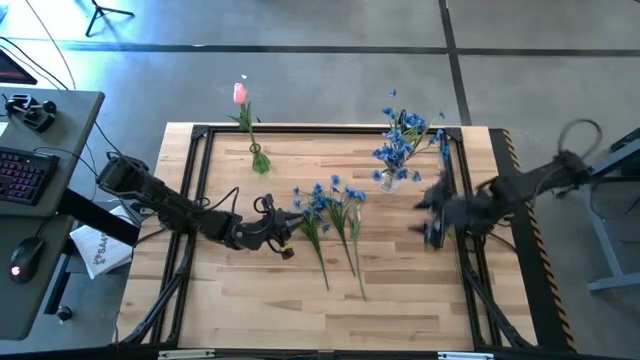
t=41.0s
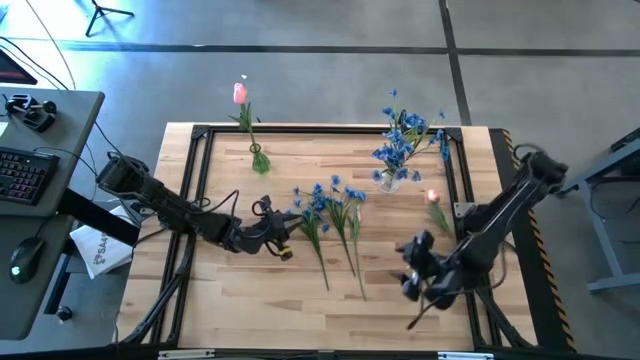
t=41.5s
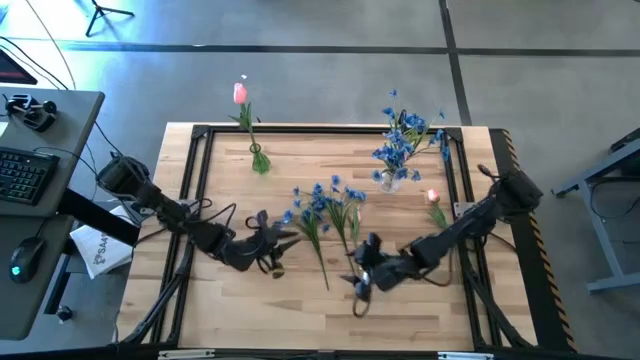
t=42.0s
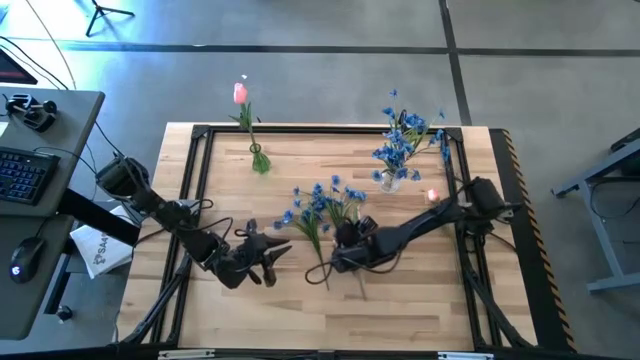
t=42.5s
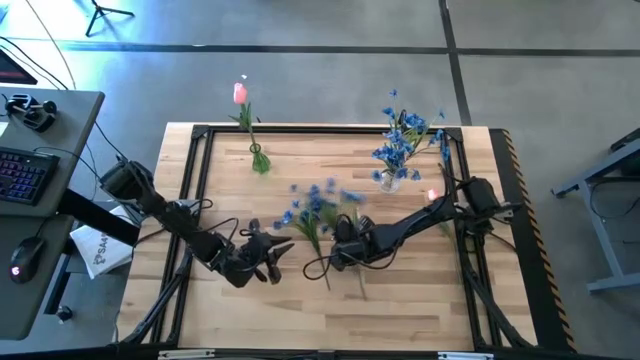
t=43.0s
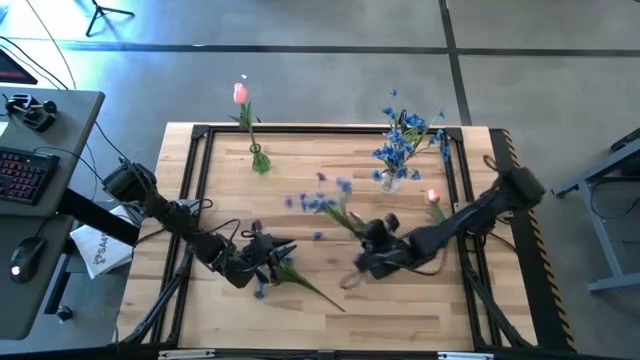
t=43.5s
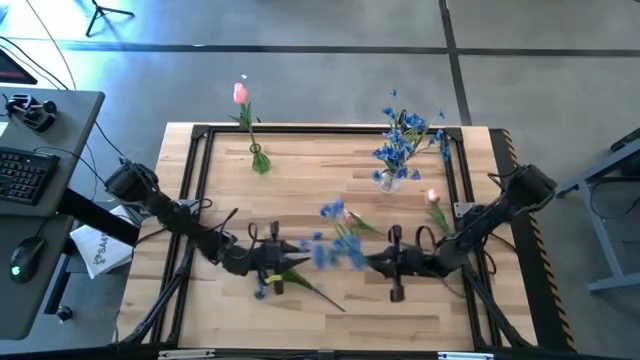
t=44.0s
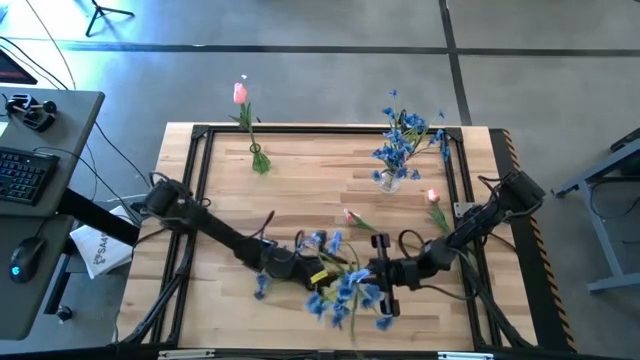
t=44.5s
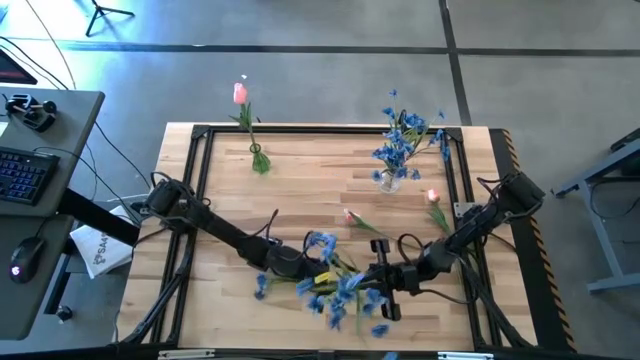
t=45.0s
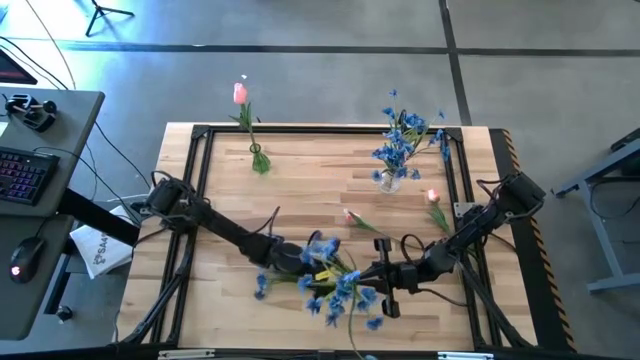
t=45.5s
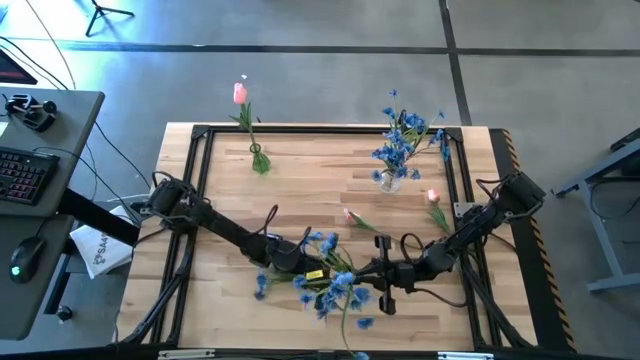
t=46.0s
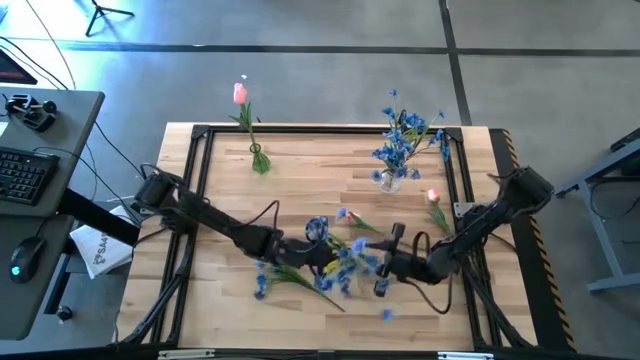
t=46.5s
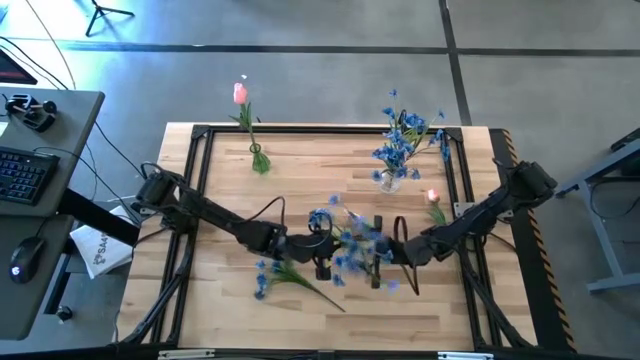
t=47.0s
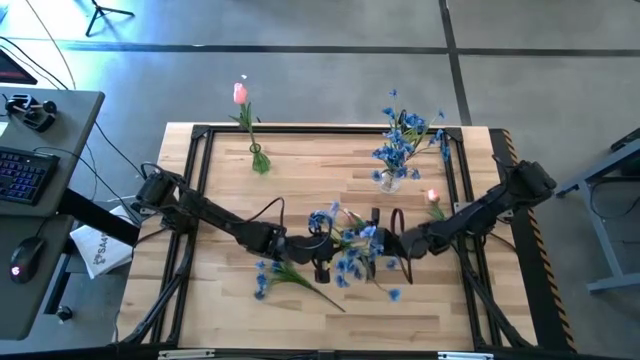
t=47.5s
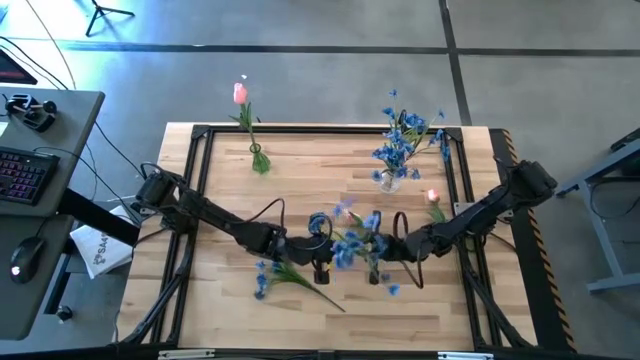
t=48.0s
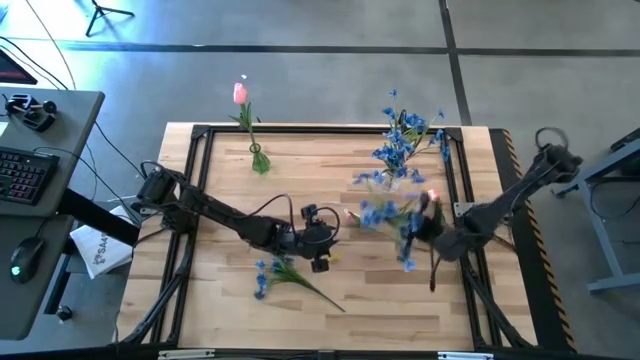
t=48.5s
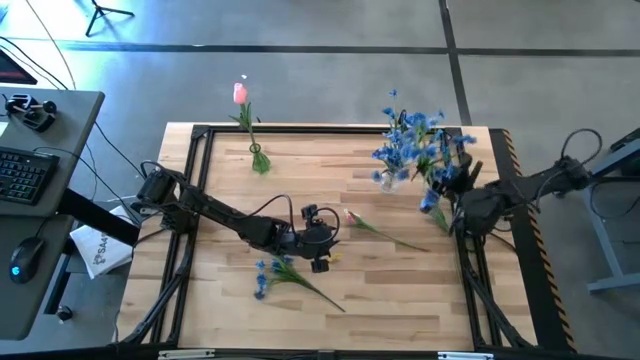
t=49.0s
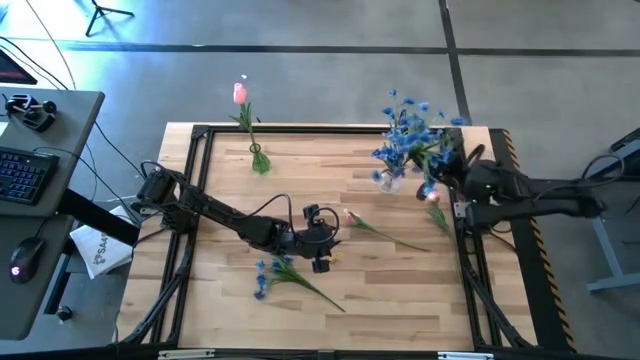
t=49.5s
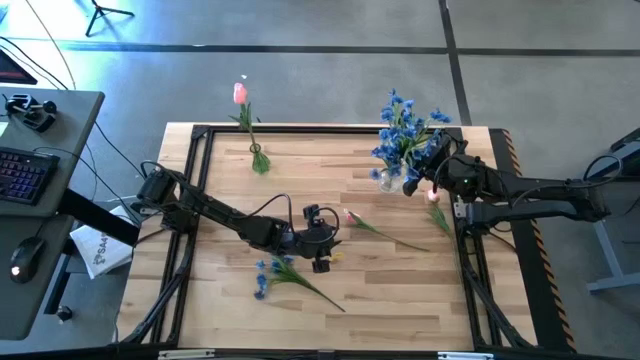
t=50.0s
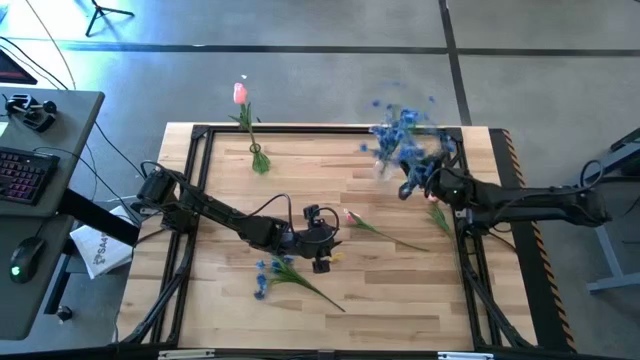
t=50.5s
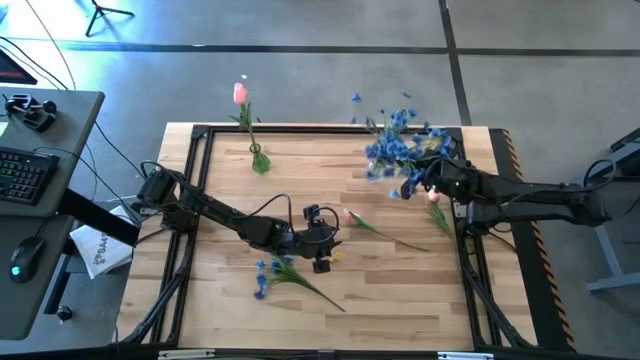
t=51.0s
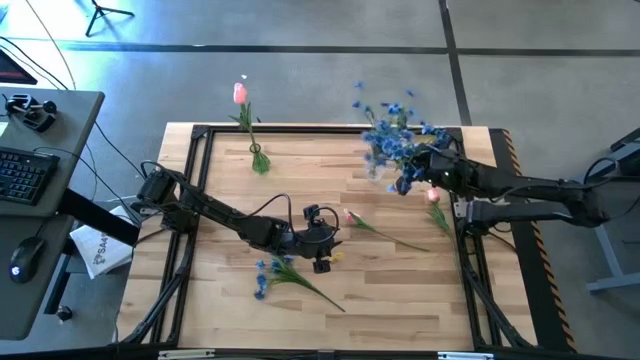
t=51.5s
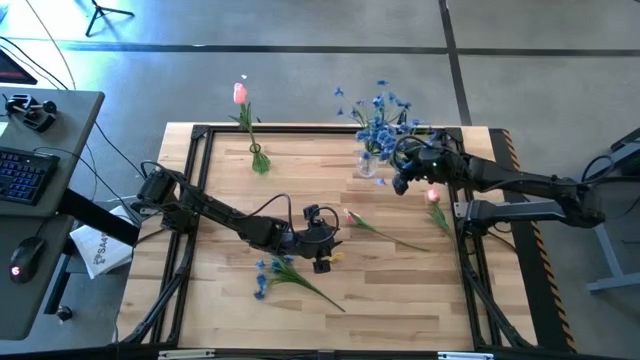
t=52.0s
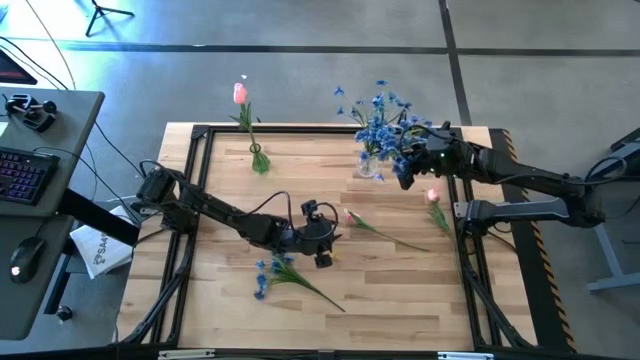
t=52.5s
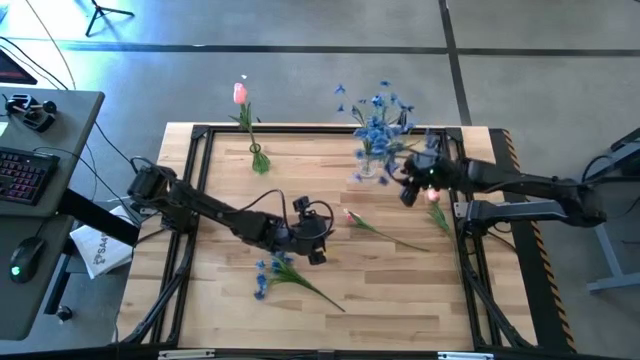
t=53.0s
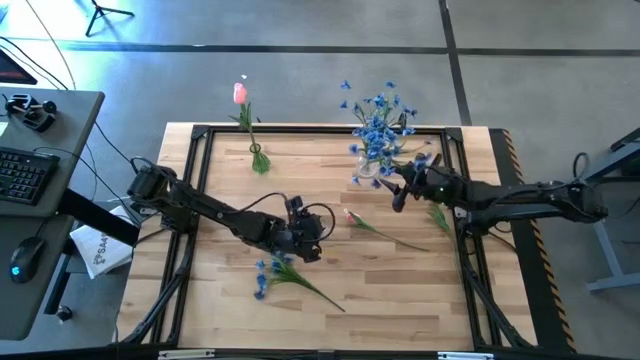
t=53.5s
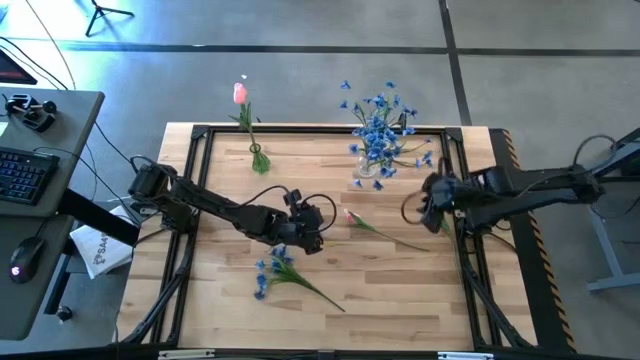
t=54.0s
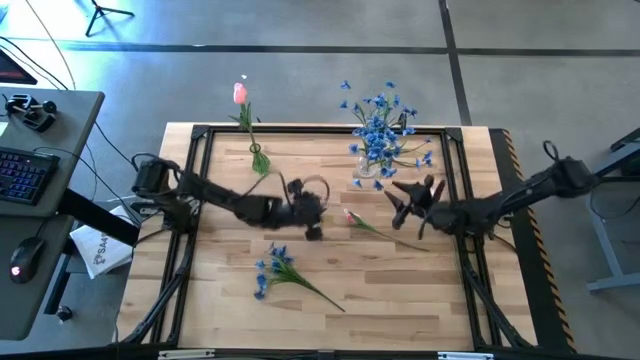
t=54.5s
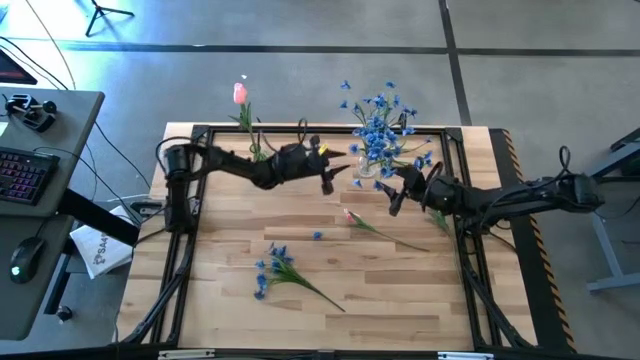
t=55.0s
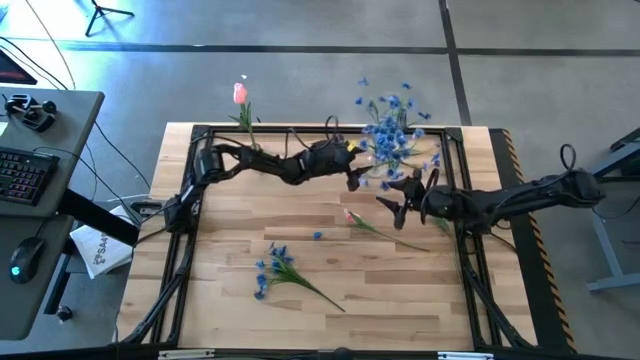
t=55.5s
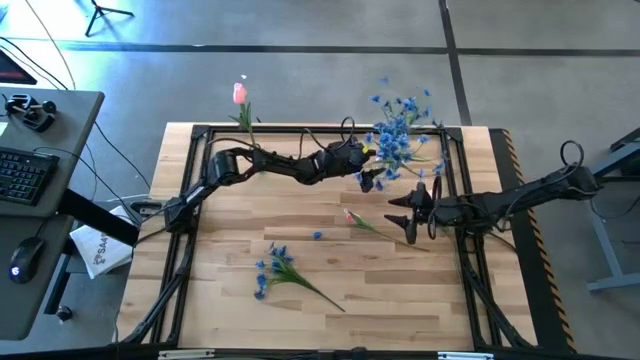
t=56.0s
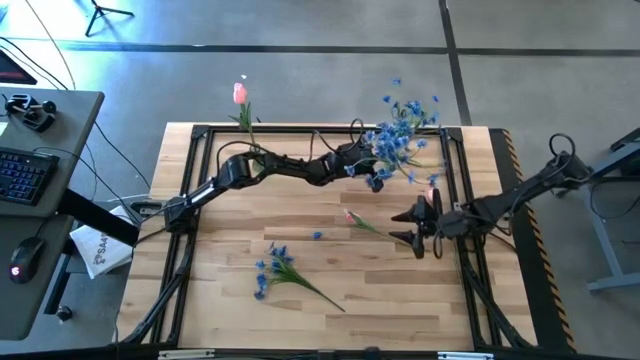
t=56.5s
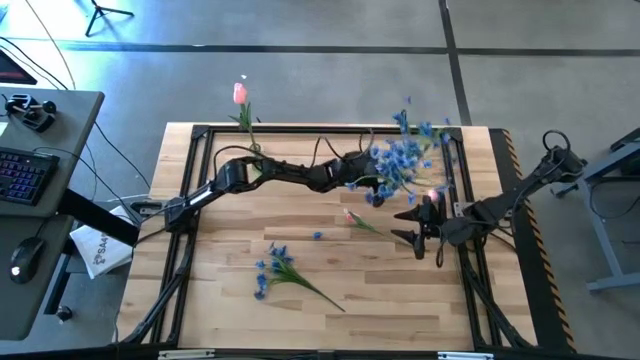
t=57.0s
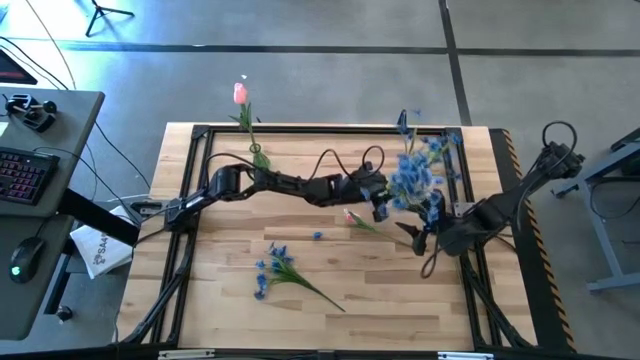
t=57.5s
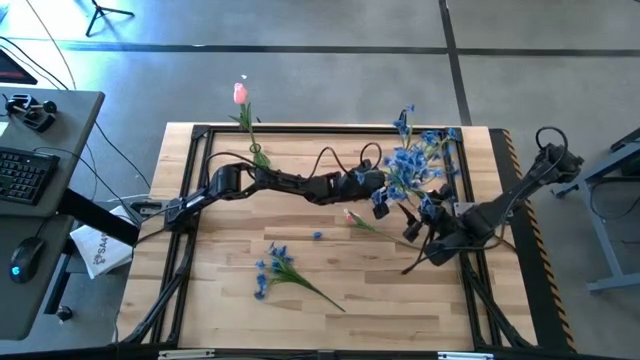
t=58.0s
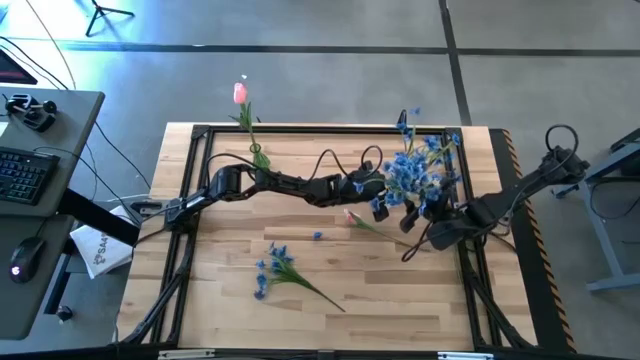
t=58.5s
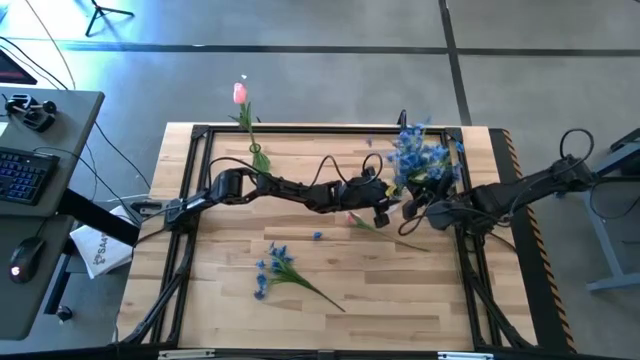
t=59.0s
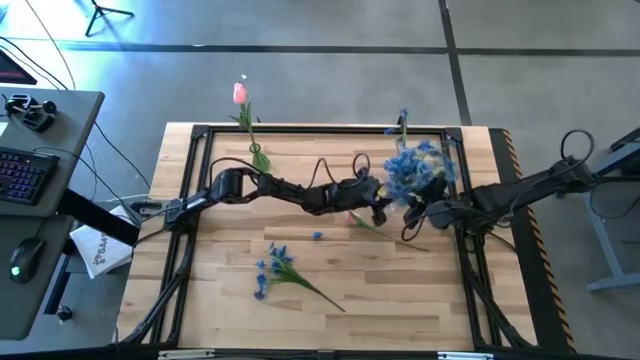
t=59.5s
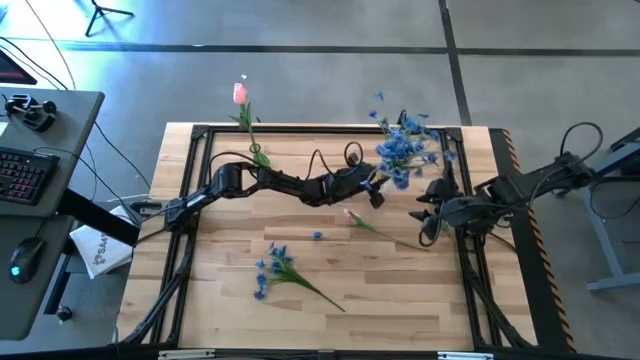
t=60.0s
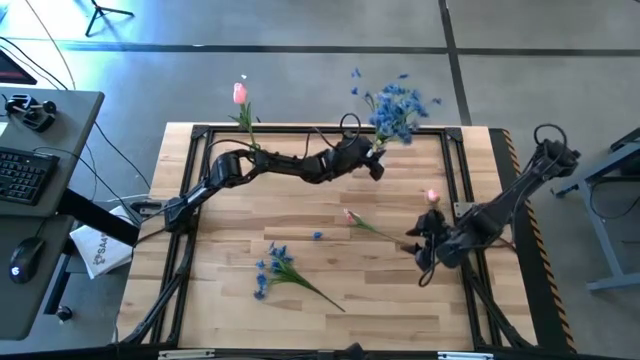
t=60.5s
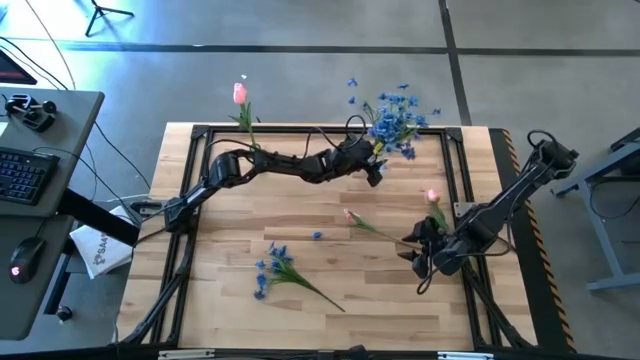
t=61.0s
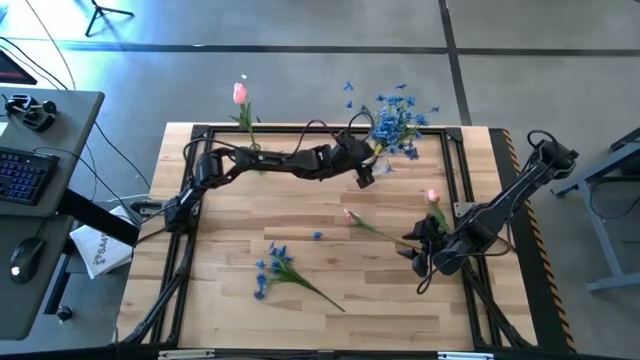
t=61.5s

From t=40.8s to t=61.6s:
Task: Sort flowers into vase by color
Put the right blue flowers into the transparent vase

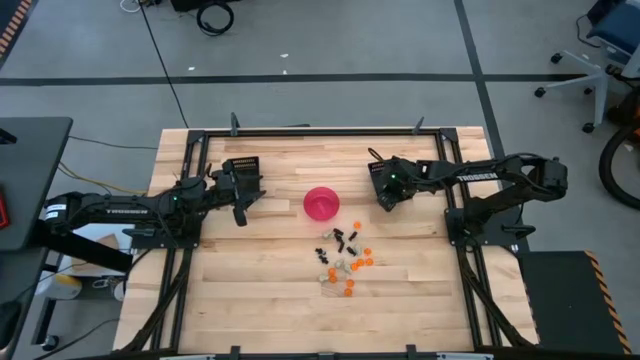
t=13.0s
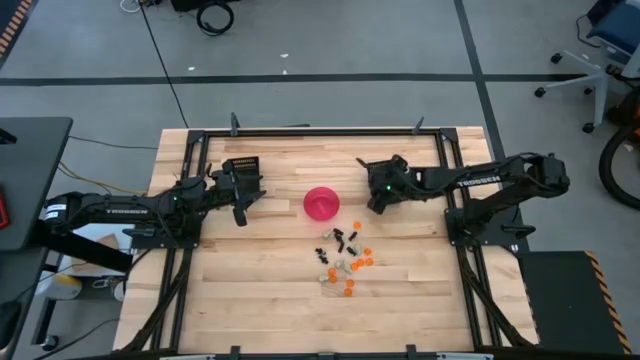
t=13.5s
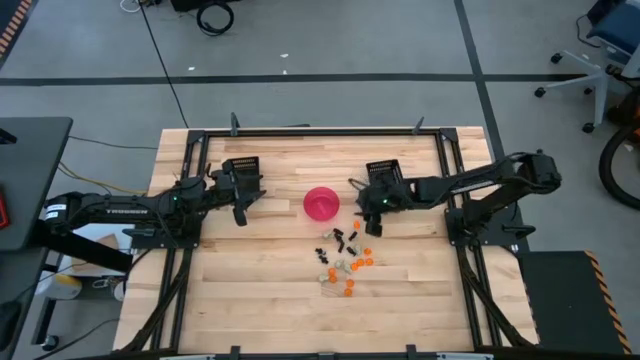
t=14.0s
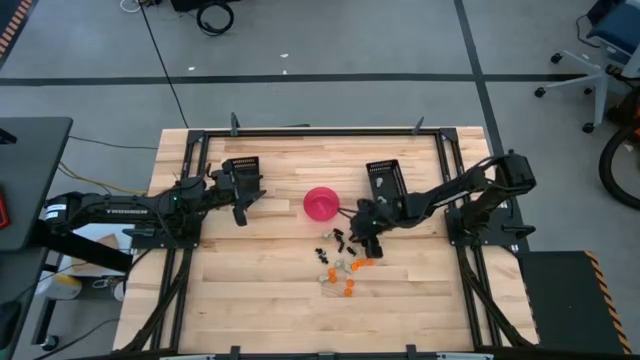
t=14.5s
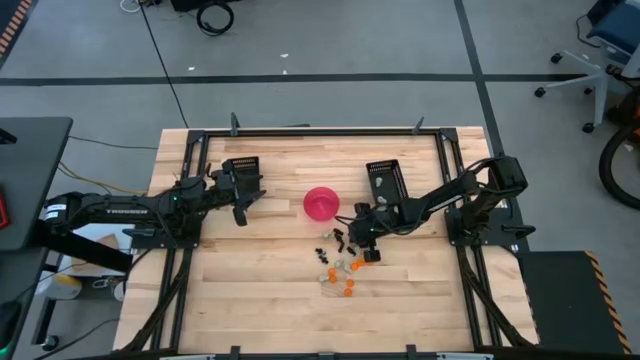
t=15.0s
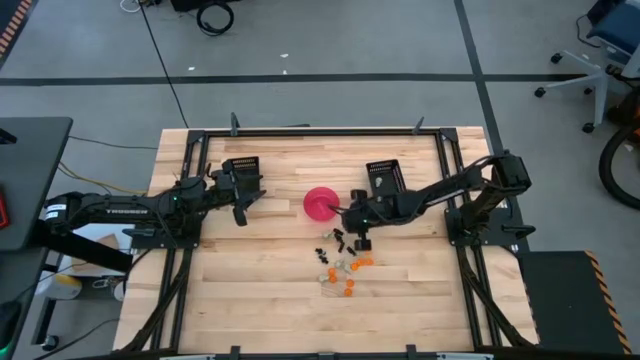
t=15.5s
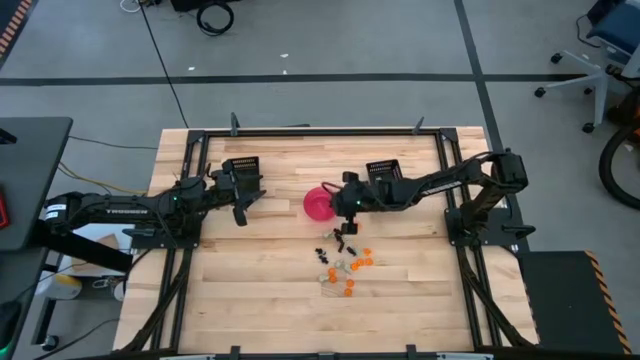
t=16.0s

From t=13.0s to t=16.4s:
Task: Sort Halloween decoration
Put the black skeleton toy into the pink bin
